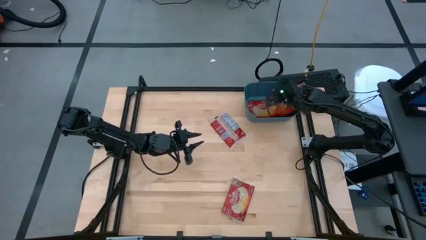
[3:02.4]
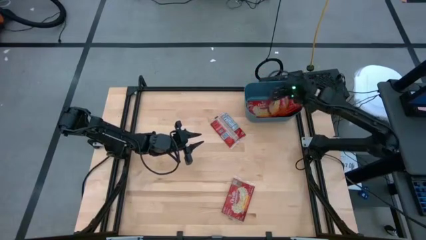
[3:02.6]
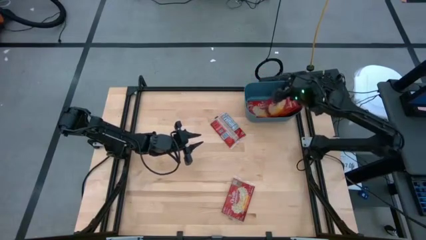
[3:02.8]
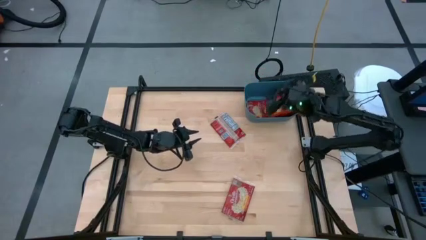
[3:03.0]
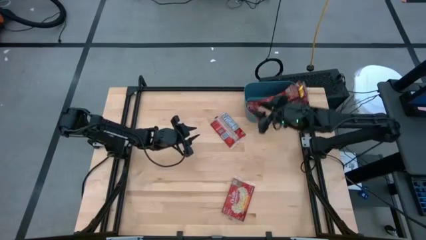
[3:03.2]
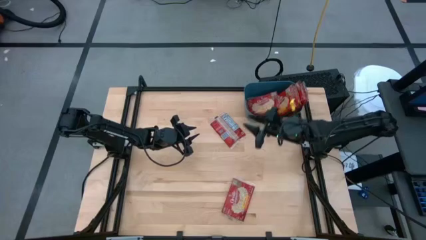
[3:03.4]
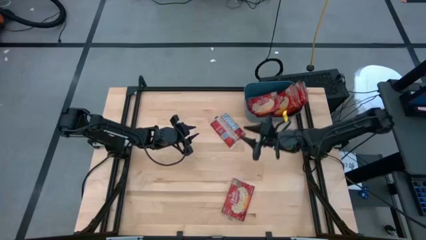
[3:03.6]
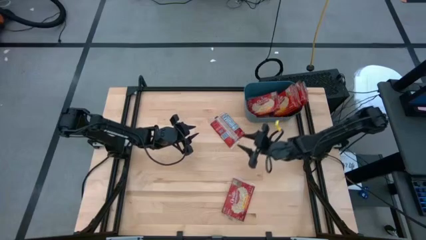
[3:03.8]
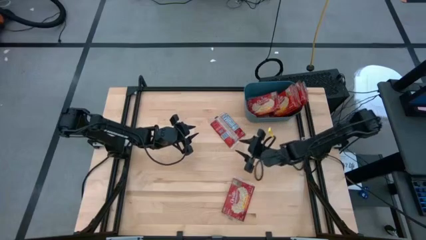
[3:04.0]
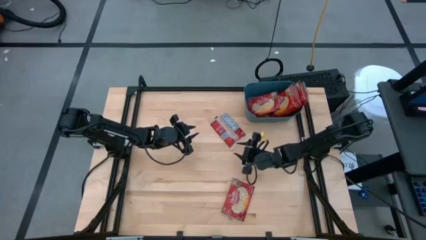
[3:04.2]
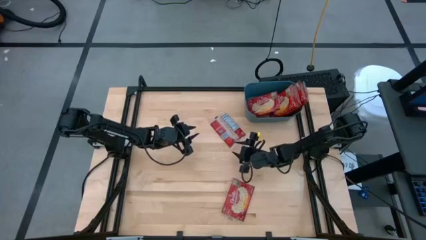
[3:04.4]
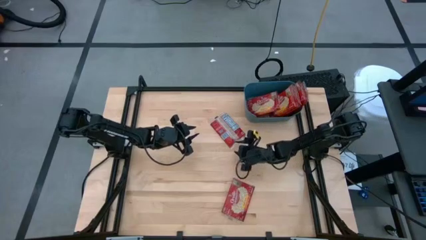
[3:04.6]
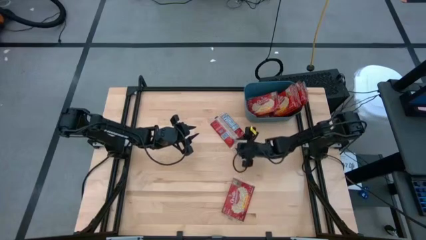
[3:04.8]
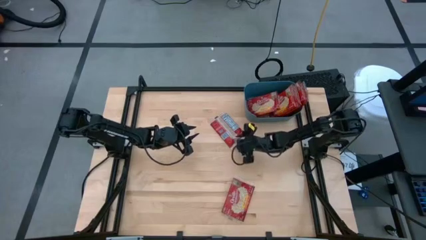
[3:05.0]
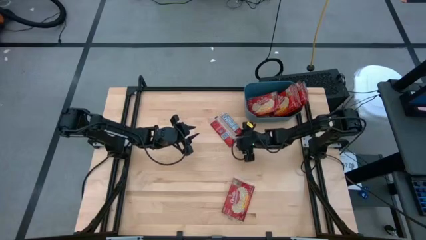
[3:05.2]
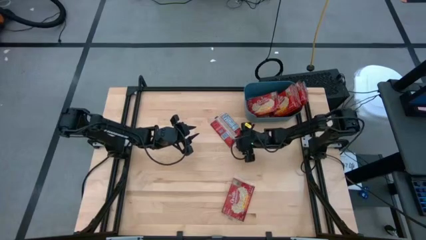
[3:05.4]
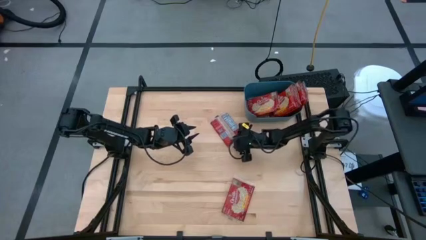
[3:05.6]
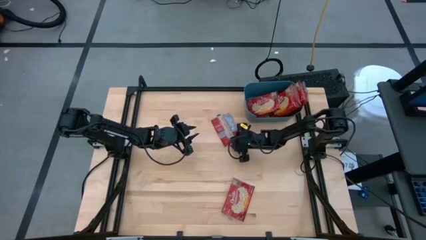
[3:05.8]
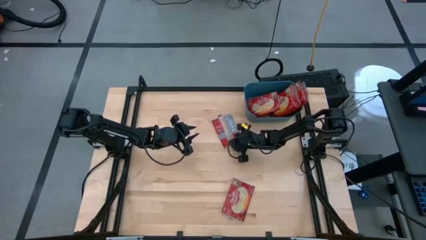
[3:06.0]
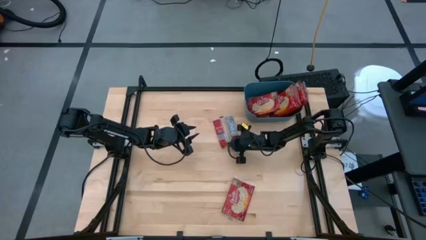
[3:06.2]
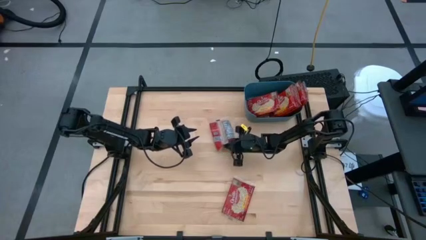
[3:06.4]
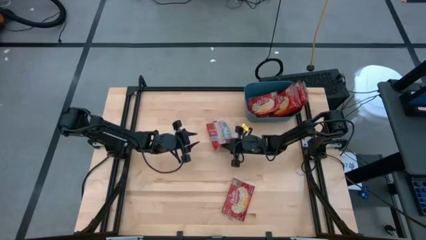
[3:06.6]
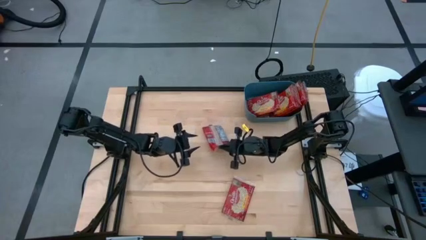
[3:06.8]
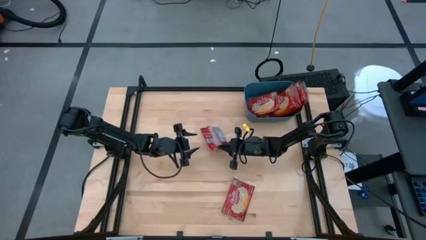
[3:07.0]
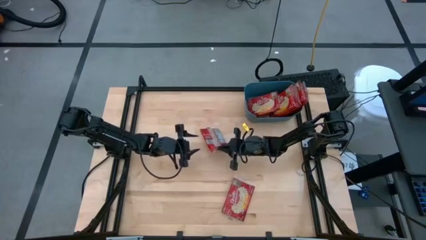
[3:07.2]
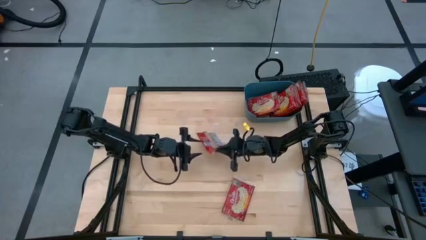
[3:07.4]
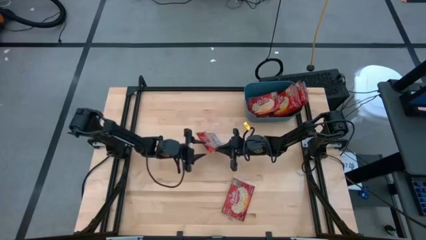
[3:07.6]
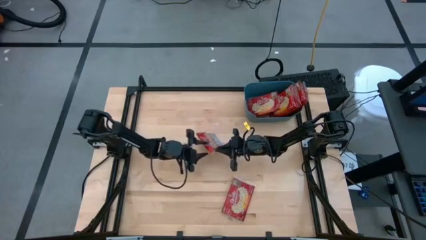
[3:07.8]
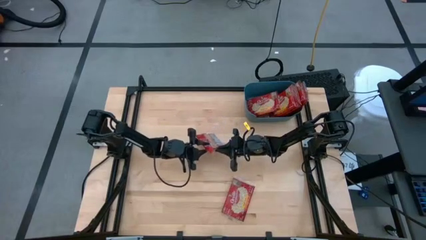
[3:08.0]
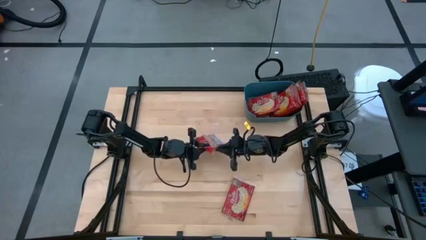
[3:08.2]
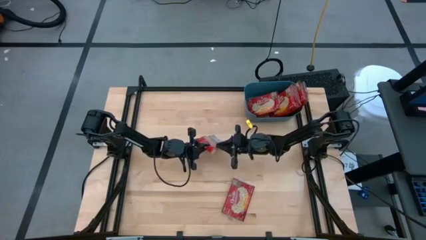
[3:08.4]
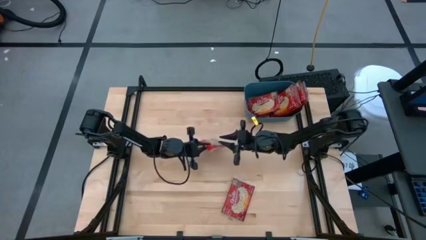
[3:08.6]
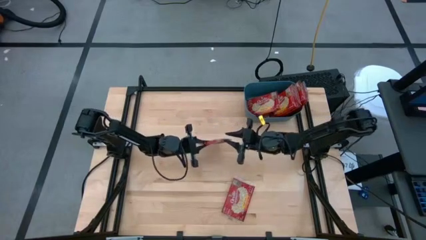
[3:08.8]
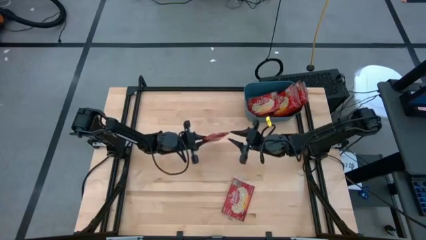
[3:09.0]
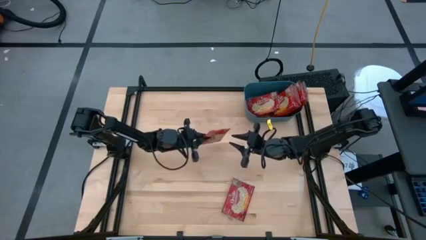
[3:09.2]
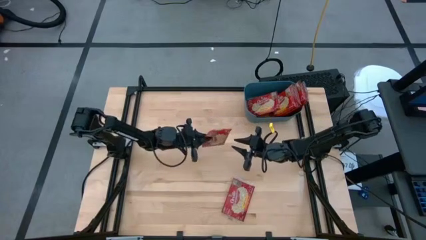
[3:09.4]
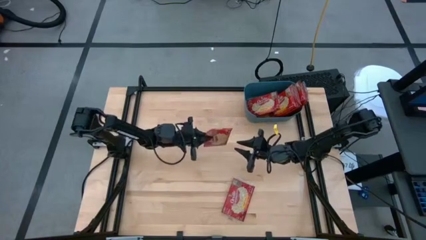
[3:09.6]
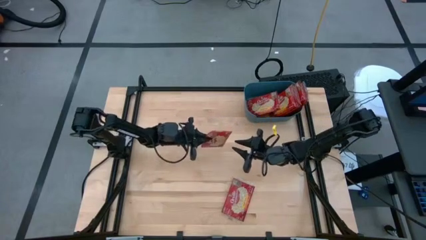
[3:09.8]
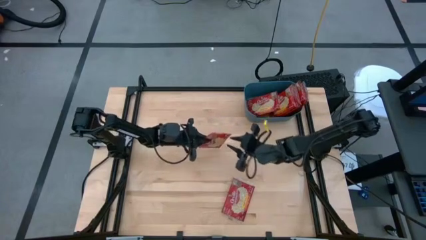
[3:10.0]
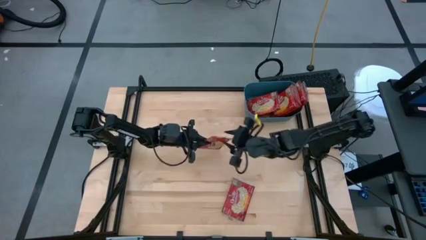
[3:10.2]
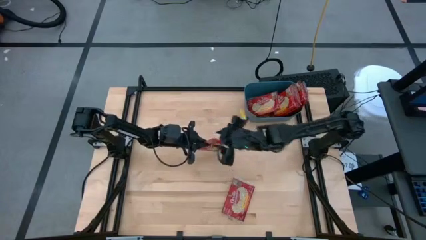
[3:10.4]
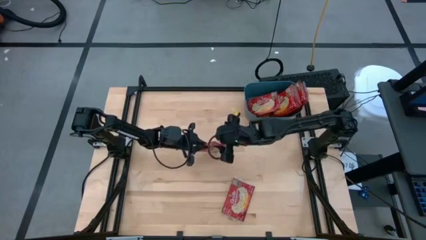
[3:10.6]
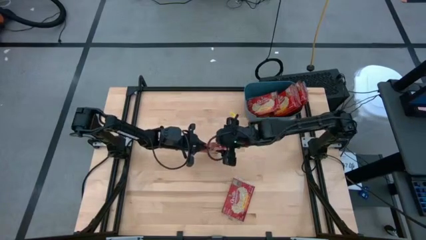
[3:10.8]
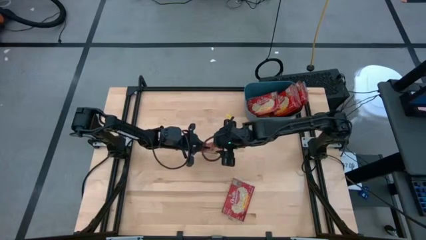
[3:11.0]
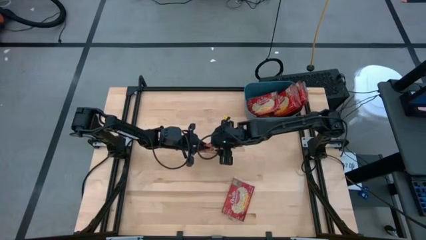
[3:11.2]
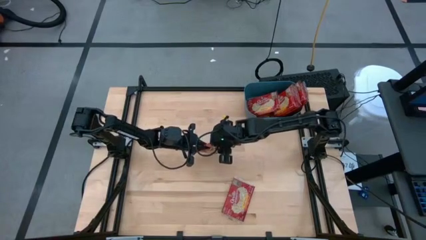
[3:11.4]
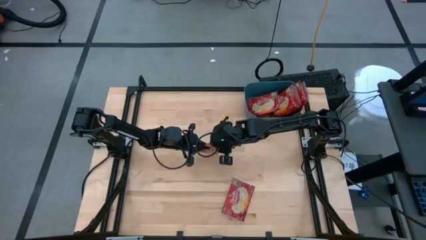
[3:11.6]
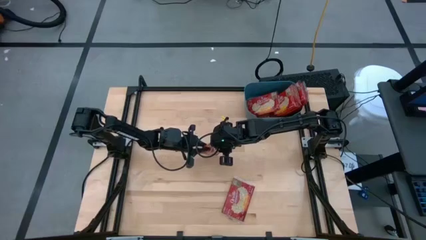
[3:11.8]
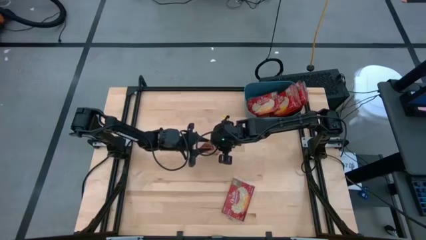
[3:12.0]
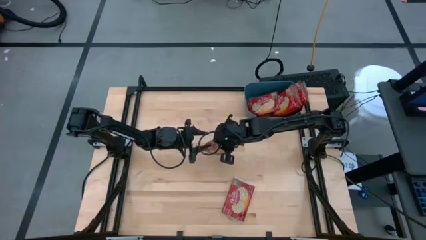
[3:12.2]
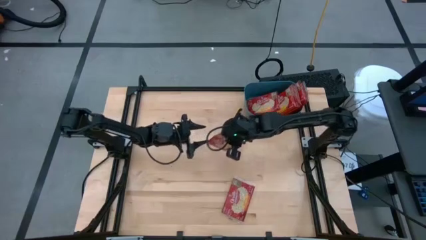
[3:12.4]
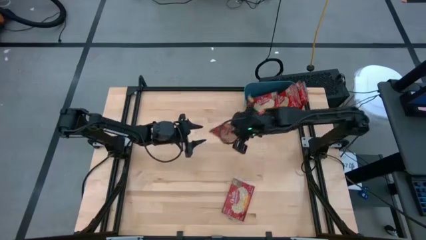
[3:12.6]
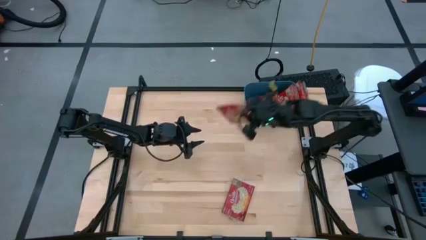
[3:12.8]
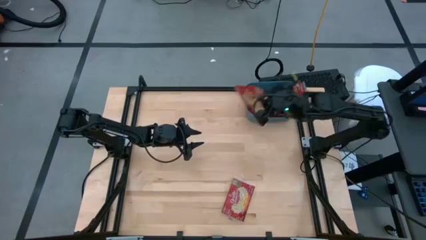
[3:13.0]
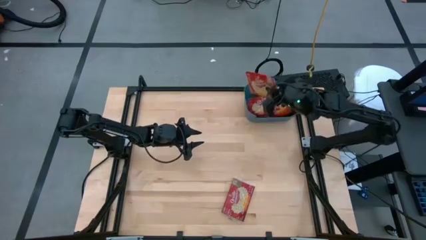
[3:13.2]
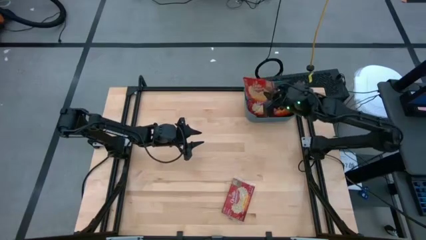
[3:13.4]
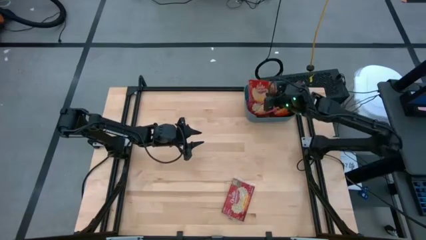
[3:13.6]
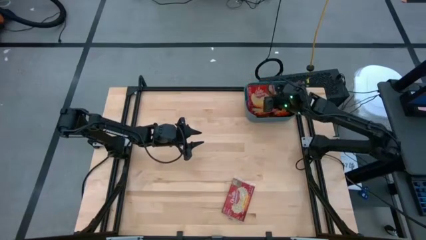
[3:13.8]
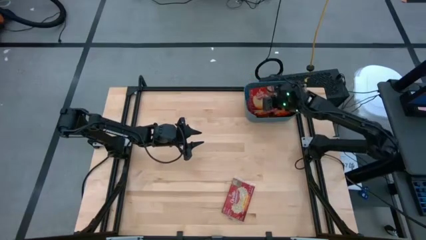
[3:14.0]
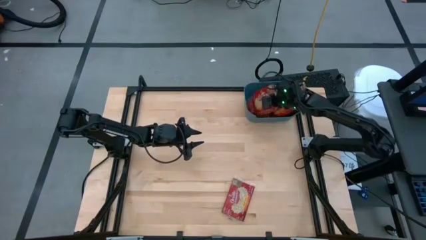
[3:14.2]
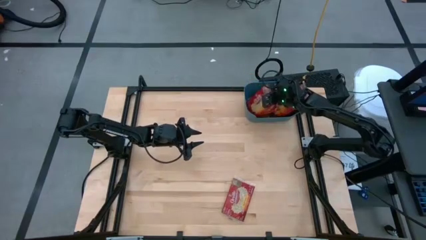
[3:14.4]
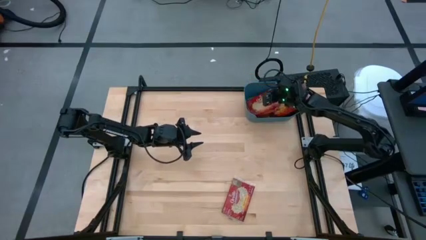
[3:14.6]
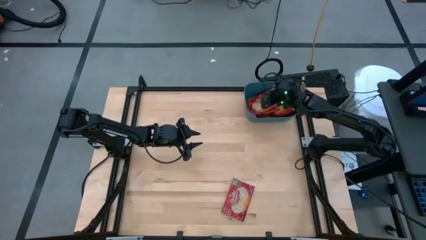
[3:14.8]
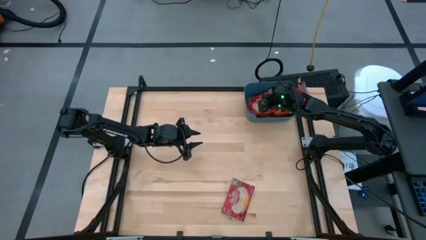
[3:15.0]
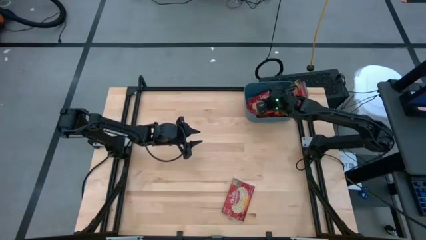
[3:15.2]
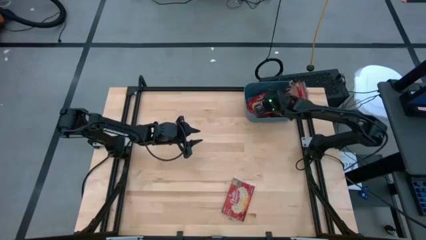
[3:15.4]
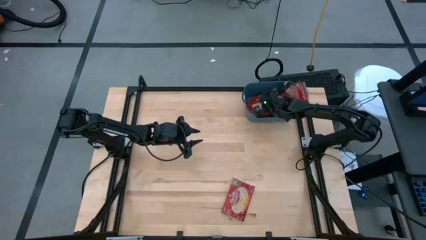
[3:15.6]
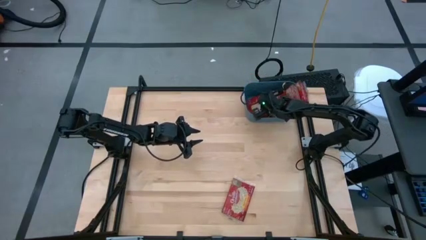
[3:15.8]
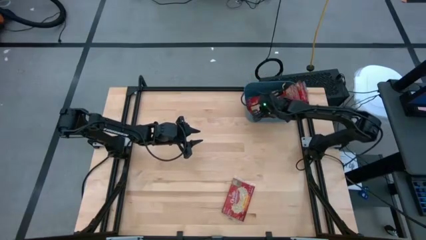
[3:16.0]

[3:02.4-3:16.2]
Task: Sort popcorn bags into baskets
Put the popcorn bag into the blue bin

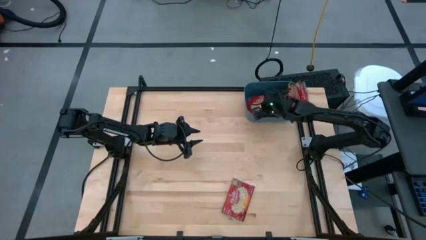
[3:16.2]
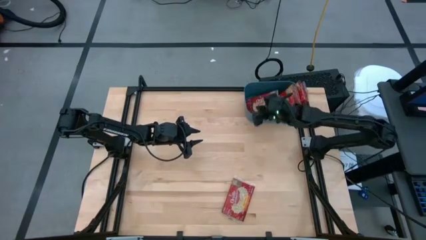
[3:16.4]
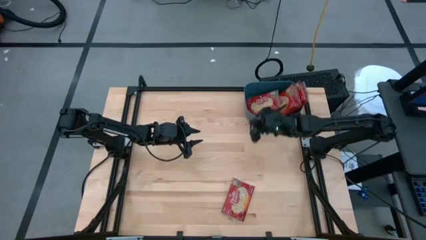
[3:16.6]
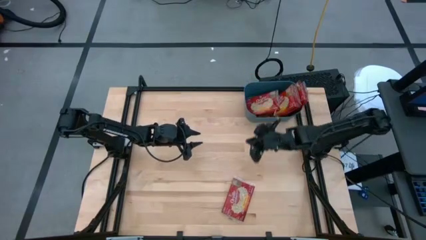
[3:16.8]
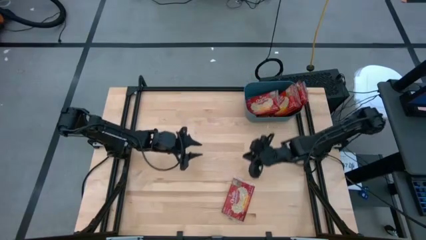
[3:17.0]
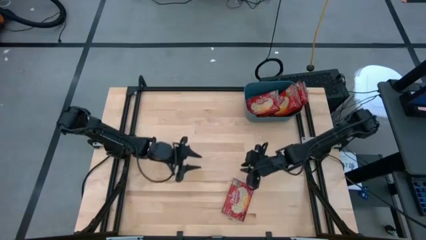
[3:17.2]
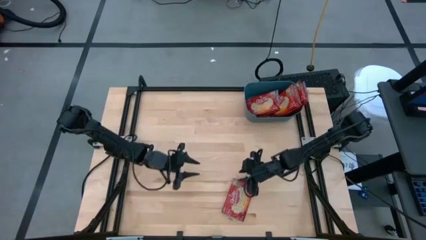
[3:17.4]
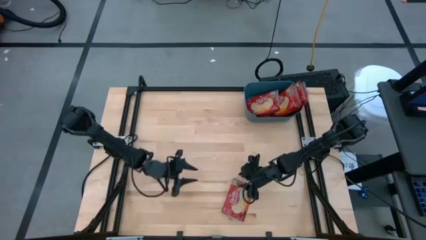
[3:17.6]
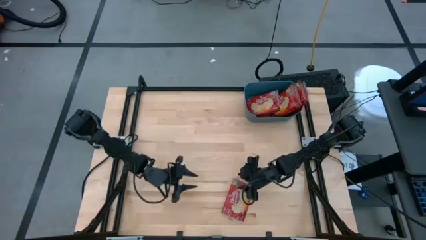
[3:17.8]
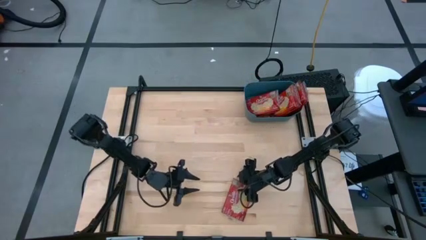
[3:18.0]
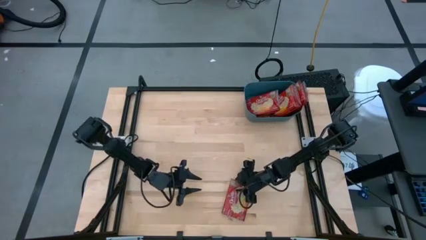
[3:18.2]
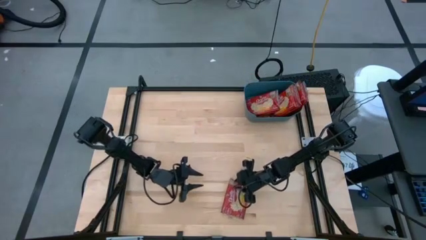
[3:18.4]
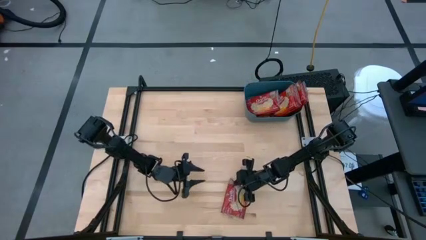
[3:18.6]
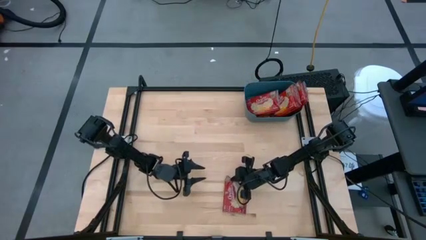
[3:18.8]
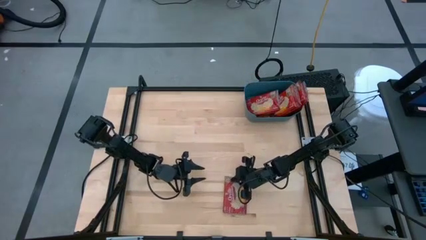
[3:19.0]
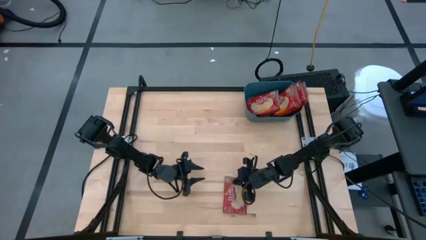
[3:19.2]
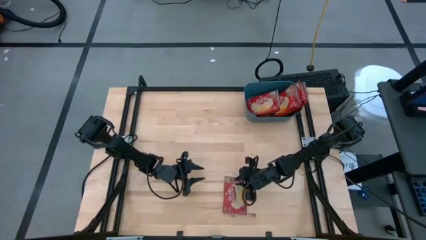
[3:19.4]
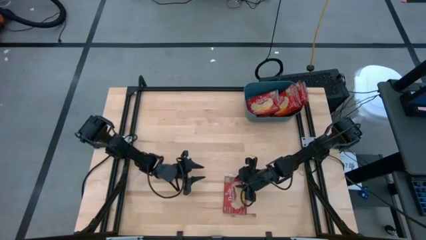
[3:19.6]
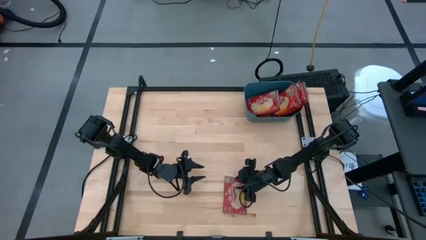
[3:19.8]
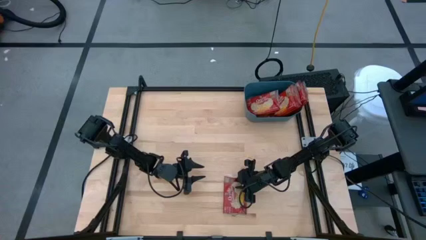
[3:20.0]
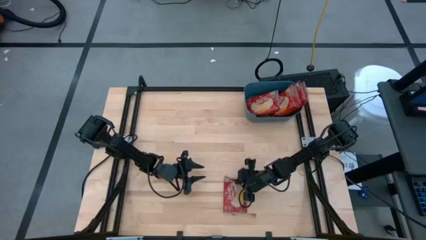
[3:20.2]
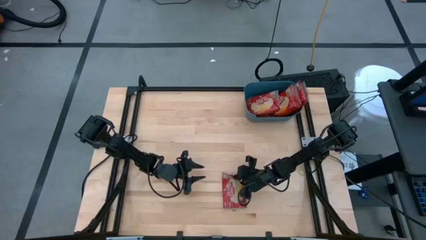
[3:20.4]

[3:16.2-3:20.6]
Put the popcorn bag into the blue bin
